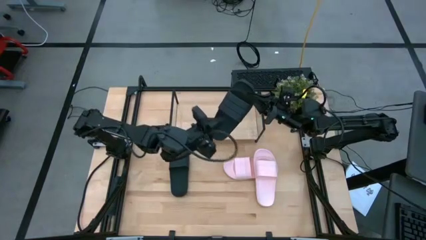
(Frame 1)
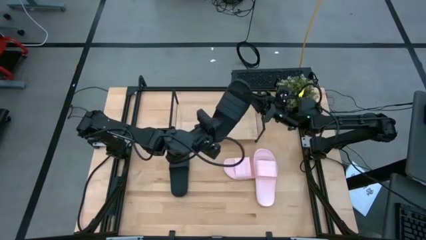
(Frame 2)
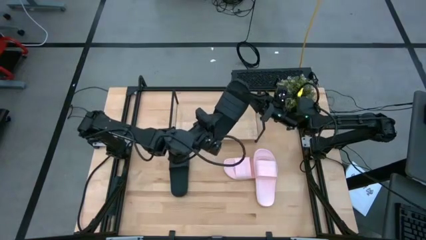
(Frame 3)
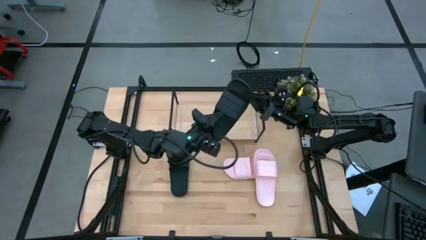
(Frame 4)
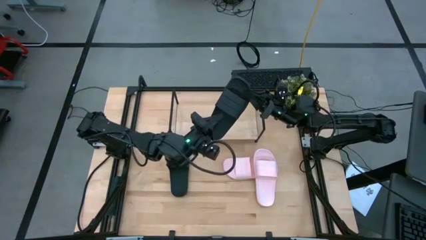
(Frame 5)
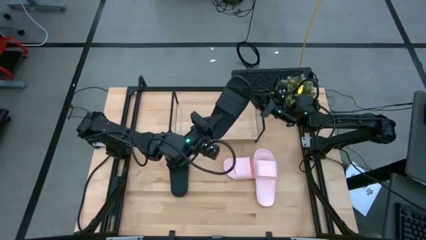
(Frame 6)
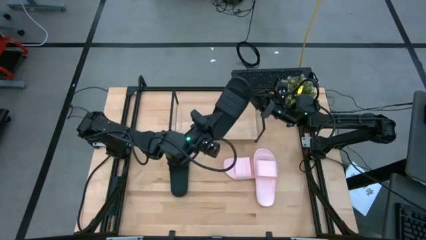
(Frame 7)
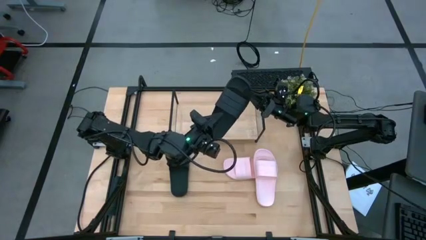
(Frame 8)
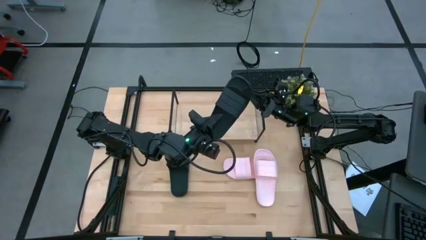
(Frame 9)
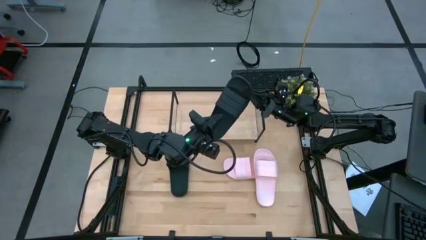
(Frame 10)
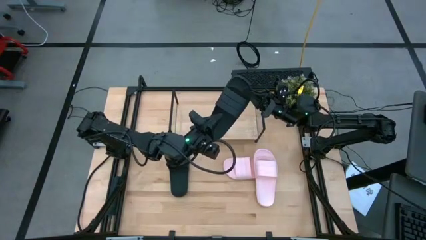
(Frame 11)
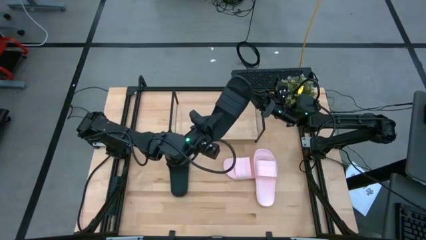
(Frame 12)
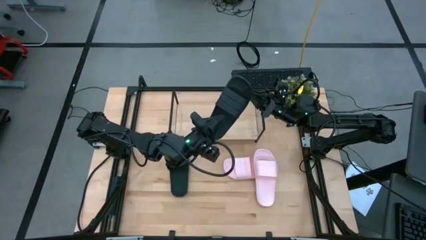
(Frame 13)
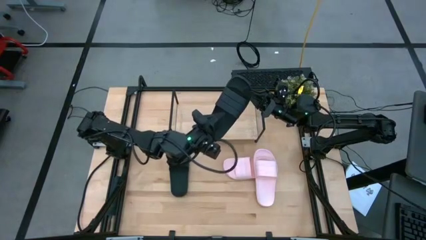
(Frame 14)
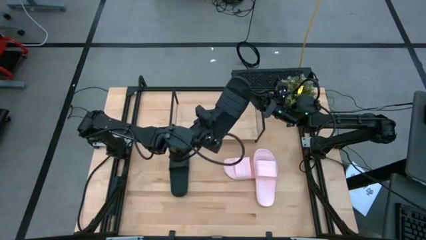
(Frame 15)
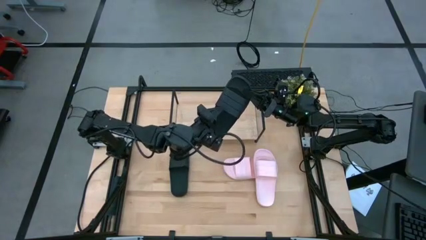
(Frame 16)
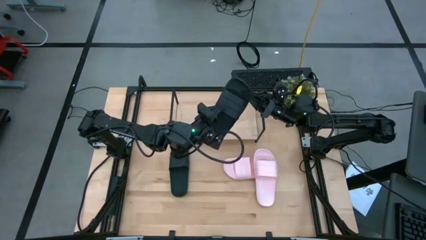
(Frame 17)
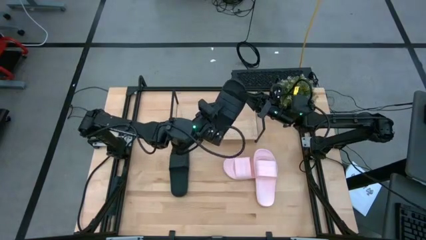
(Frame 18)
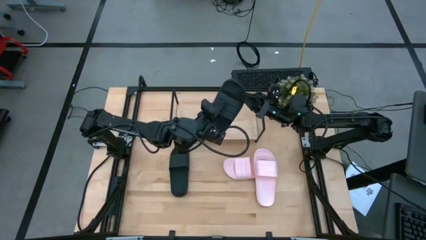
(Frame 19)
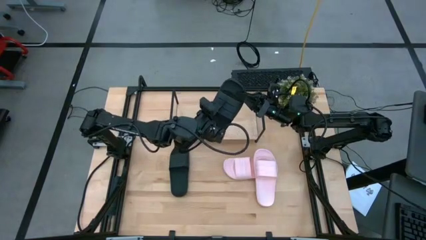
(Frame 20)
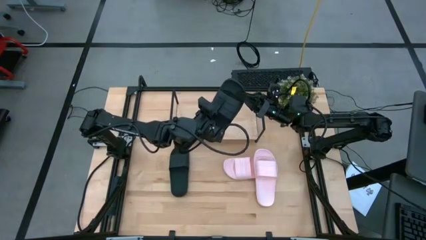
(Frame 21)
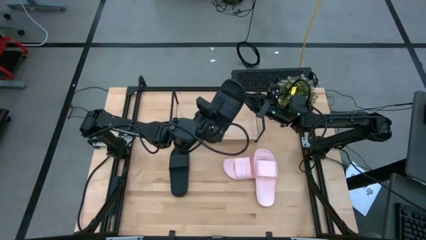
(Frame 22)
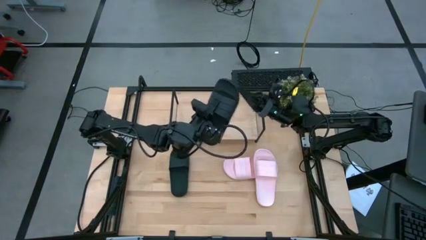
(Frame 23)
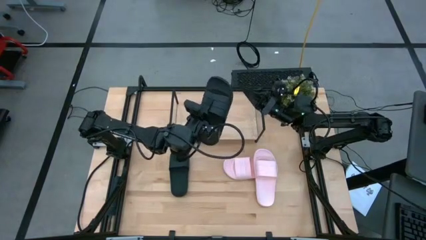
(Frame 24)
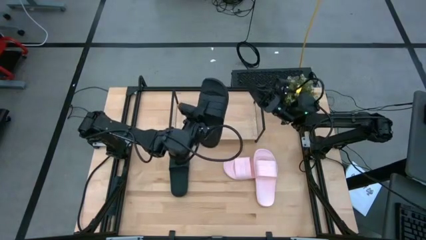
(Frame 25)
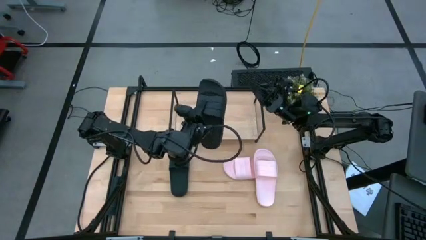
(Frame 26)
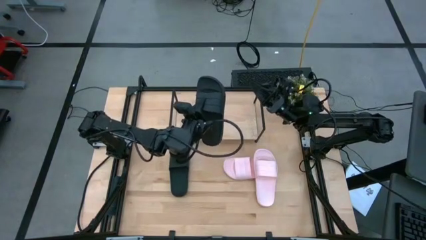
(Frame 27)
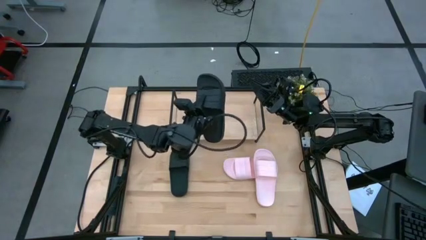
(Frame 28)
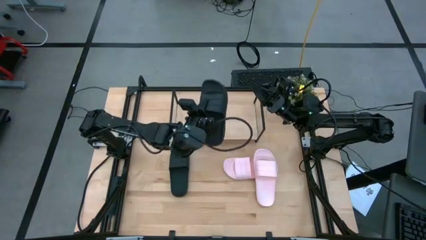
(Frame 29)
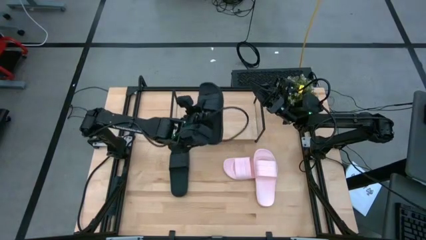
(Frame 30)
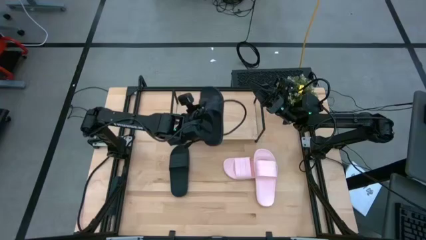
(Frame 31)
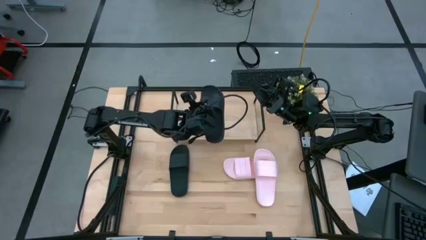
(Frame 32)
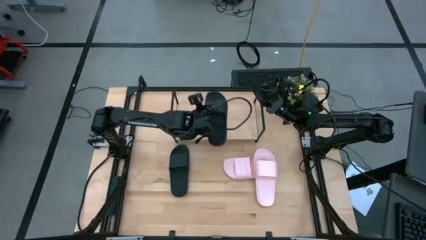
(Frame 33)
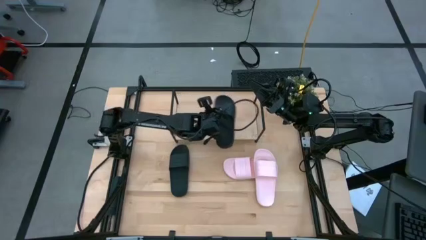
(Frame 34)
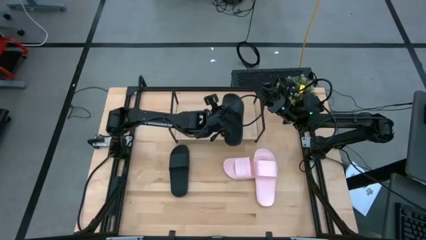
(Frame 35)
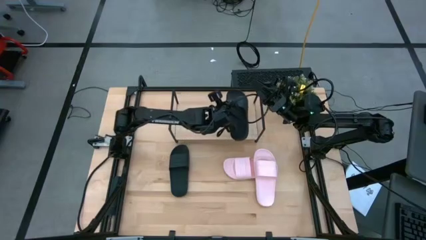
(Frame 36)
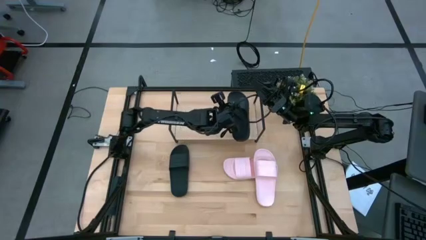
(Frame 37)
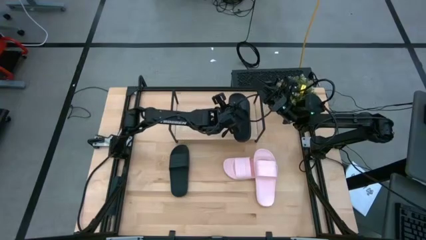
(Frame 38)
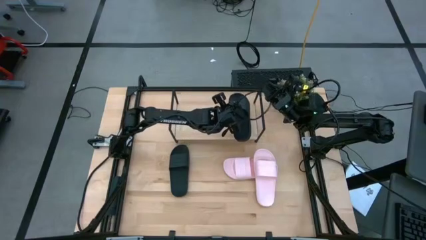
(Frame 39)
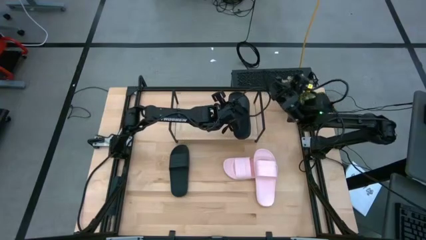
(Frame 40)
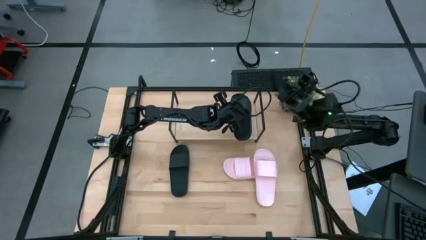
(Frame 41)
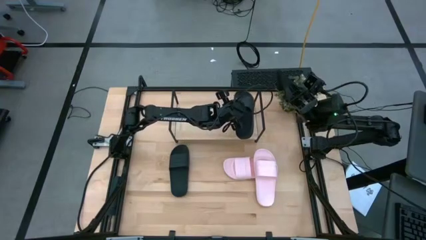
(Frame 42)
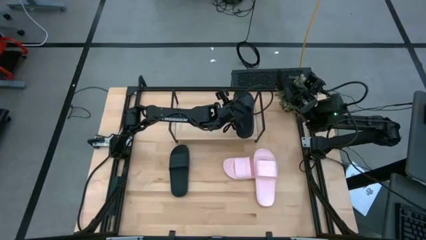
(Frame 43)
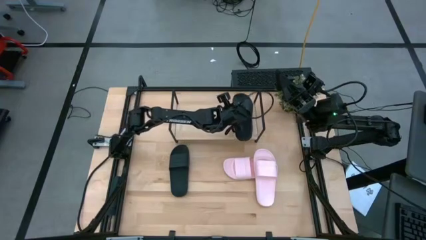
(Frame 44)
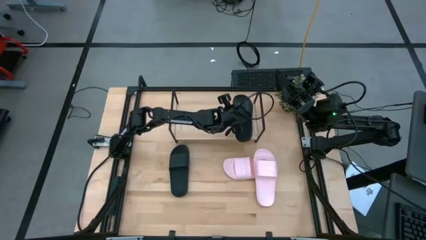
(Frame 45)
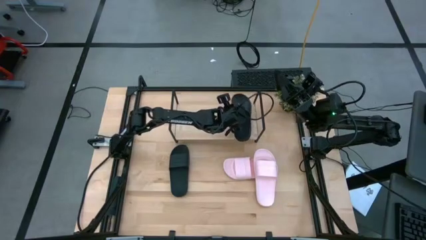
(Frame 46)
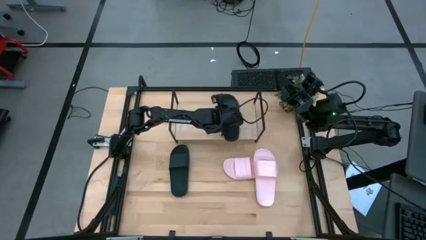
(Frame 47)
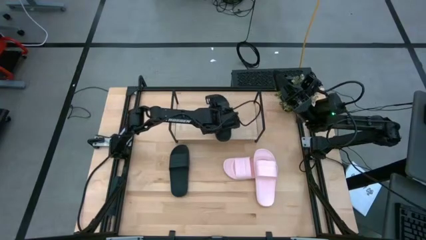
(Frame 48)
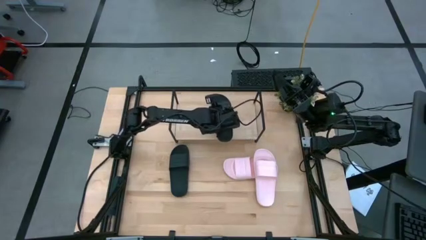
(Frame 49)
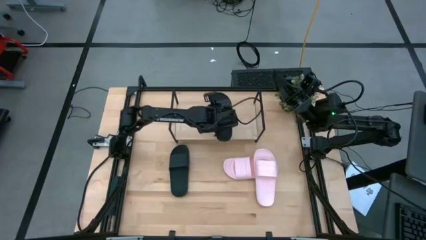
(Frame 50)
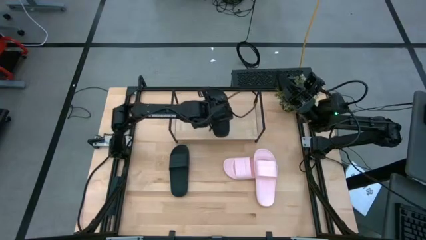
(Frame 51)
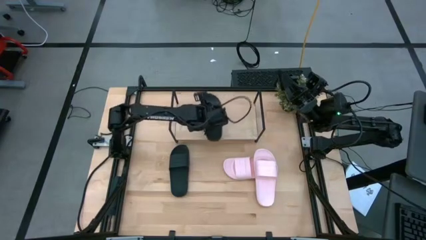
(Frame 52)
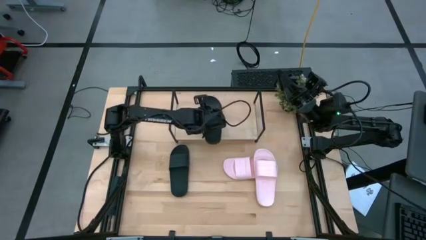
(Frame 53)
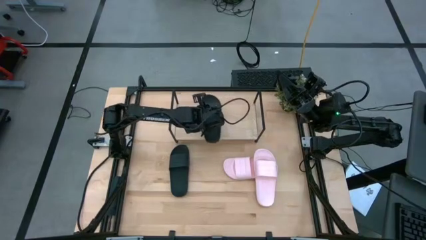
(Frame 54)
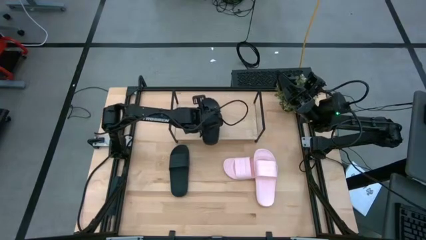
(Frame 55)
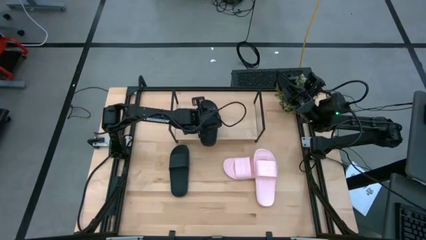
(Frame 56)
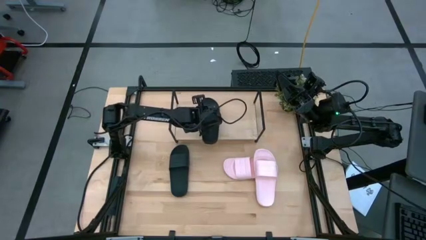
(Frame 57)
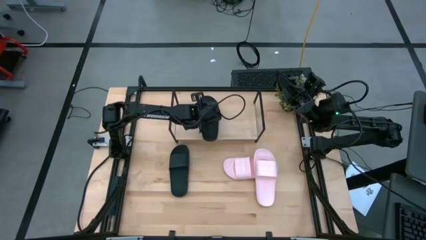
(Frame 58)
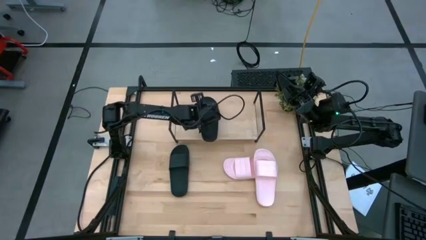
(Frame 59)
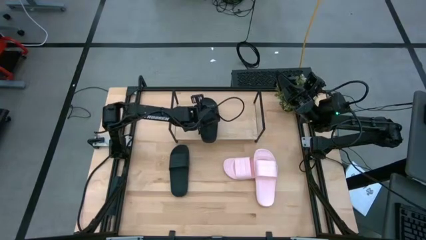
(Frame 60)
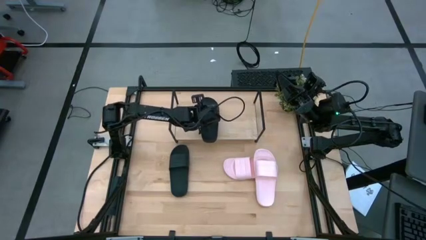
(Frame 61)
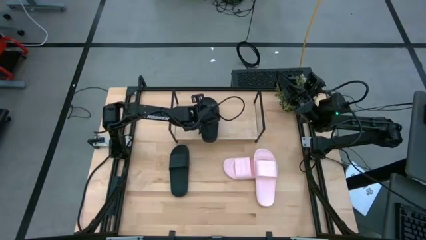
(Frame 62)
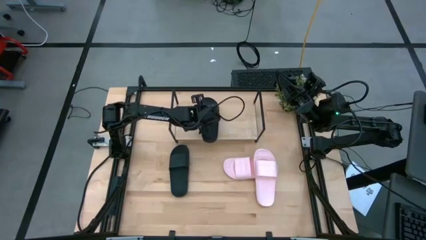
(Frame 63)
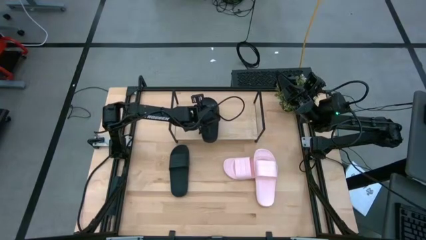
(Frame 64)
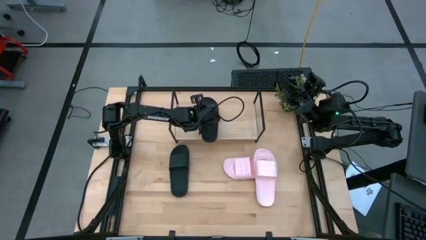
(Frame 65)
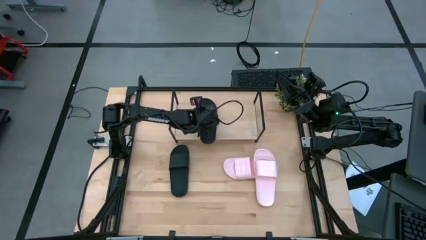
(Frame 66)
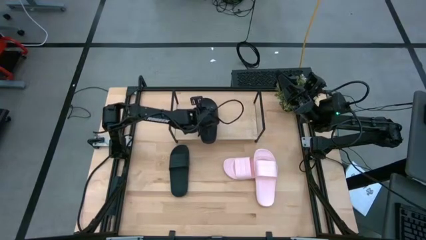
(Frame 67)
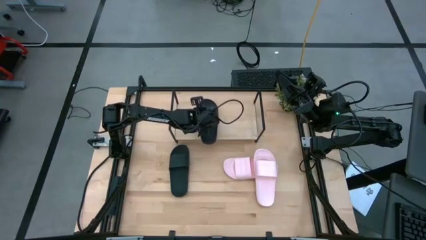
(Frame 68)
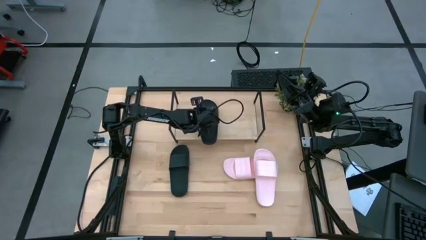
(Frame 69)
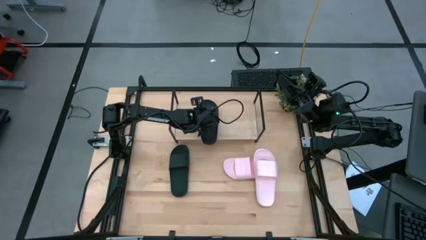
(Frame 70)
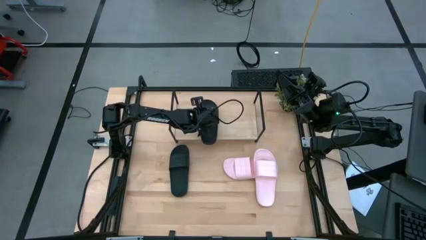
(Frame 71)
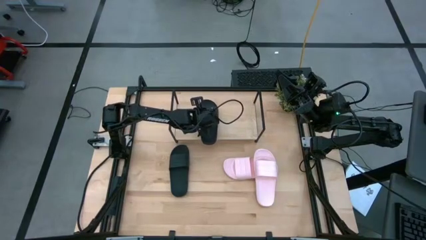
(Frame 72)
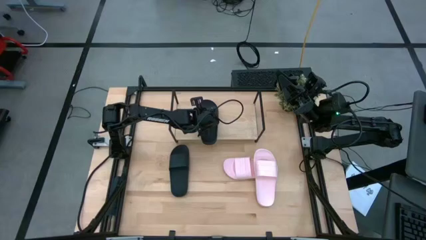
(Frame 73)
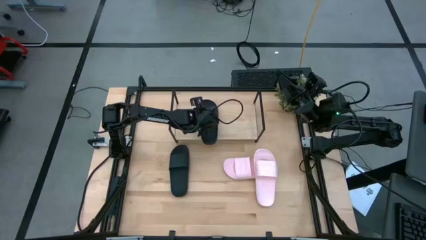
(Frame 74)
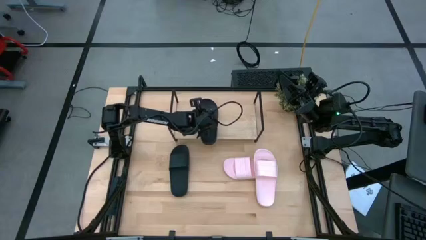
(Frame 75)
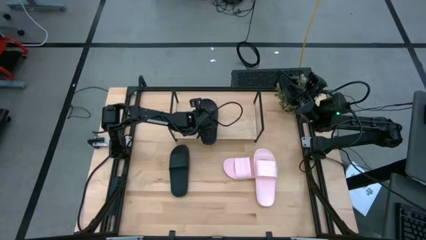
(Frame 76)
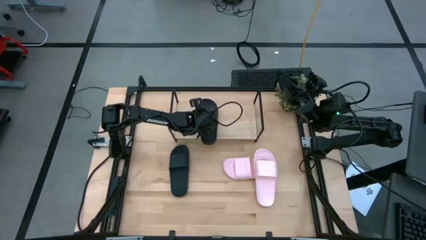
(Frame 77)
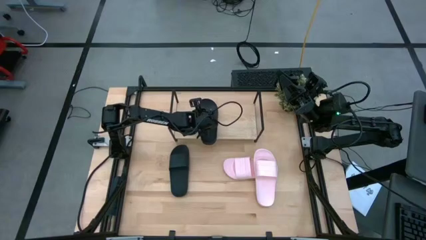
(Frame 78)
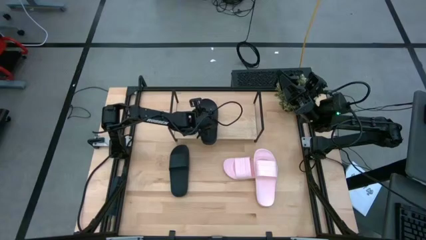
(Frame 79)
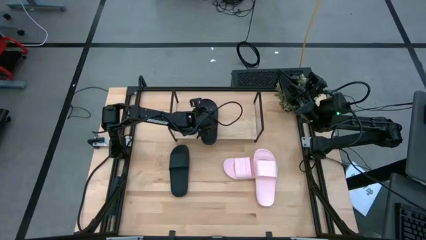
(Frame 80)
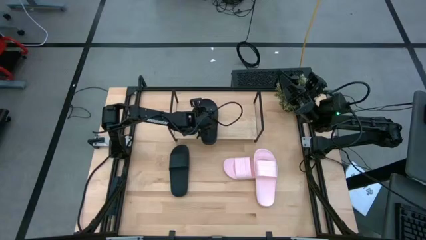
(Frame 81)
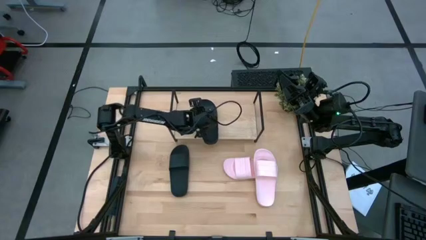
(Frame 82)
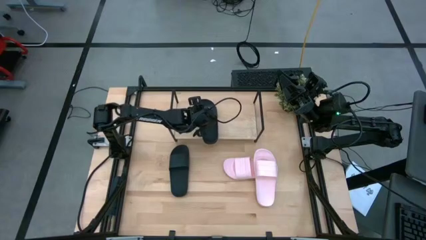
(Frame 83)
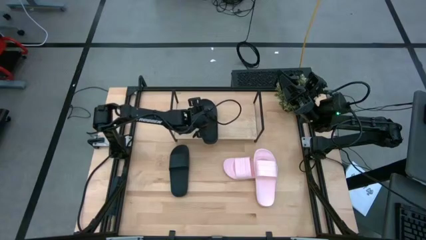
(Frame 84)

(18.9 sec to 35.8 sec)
Task: Pick and place slides into the shelf
Put the right black slide on the shelf
